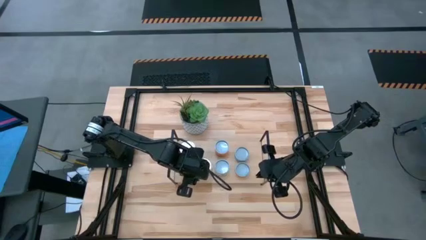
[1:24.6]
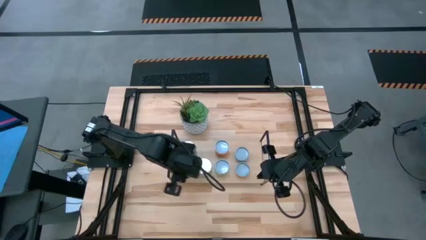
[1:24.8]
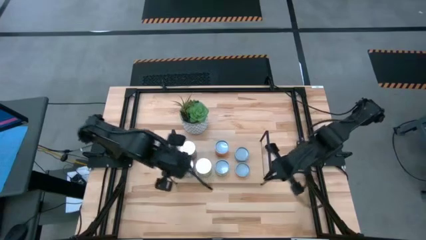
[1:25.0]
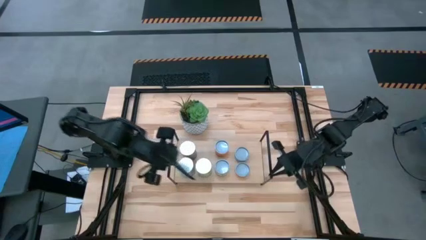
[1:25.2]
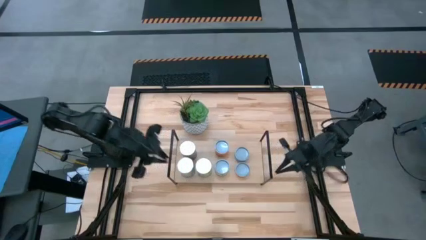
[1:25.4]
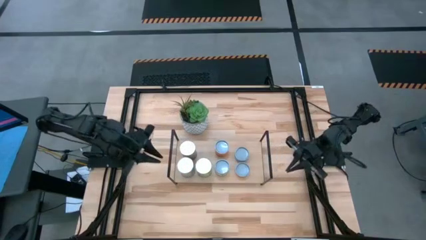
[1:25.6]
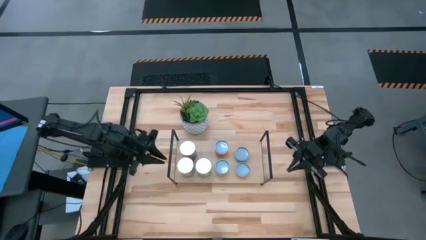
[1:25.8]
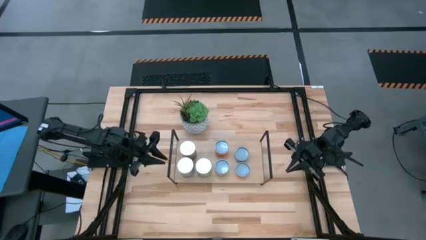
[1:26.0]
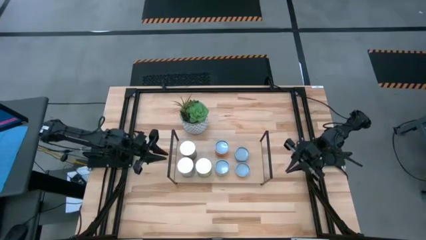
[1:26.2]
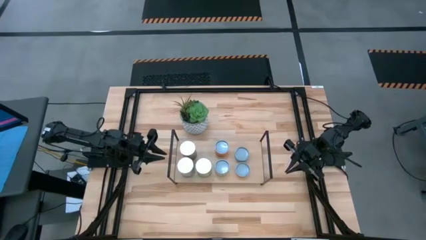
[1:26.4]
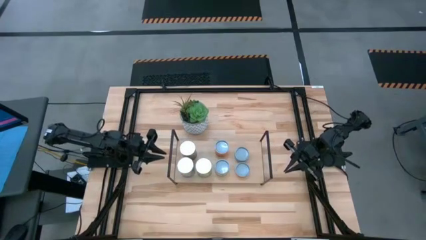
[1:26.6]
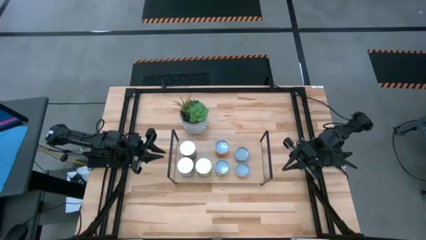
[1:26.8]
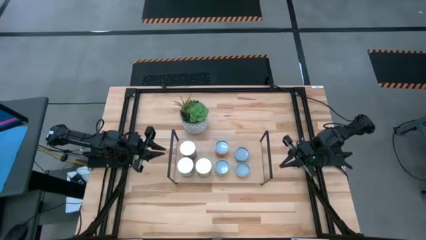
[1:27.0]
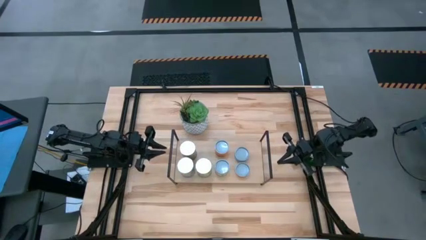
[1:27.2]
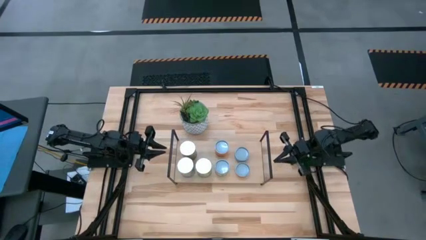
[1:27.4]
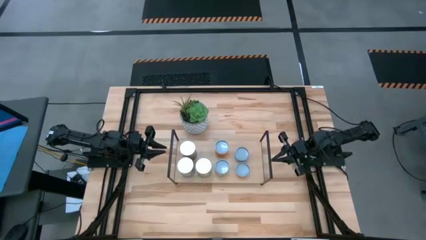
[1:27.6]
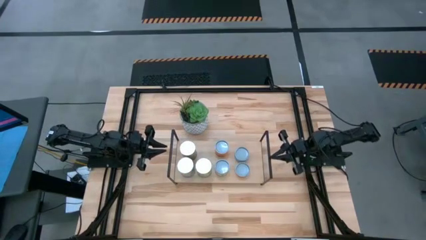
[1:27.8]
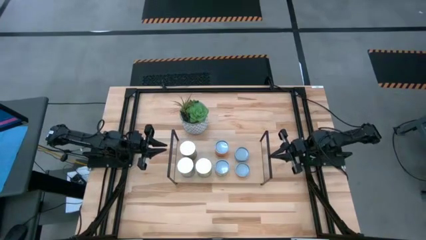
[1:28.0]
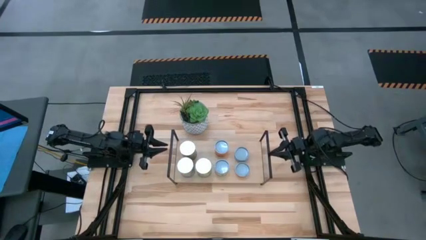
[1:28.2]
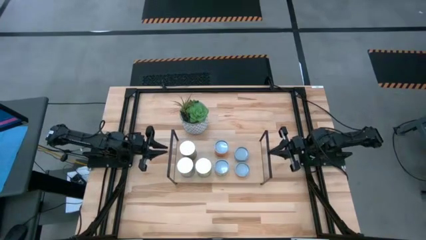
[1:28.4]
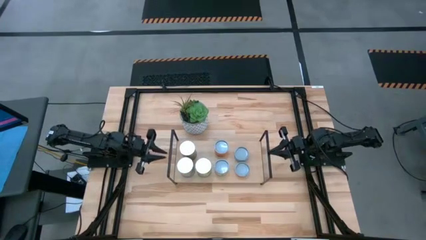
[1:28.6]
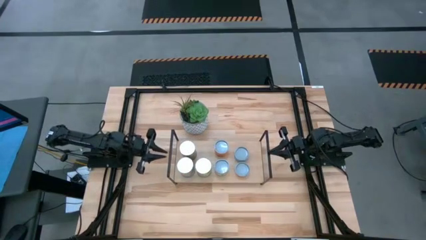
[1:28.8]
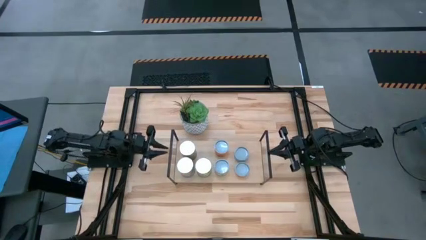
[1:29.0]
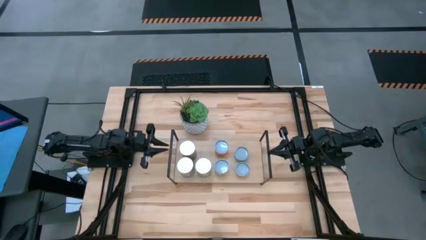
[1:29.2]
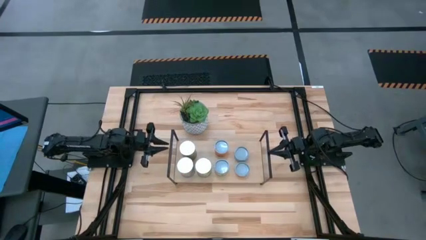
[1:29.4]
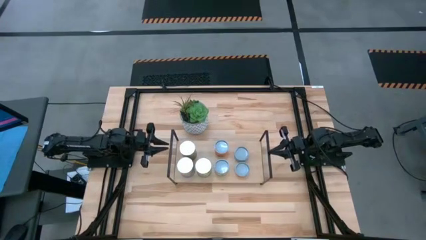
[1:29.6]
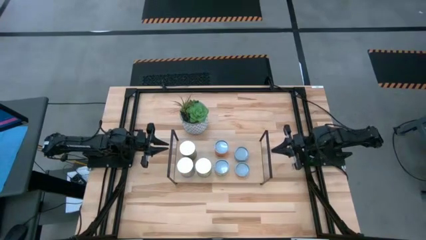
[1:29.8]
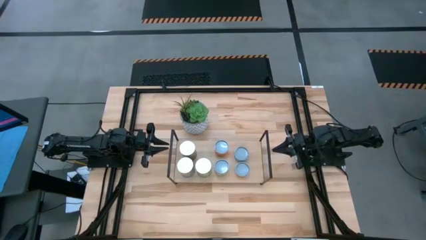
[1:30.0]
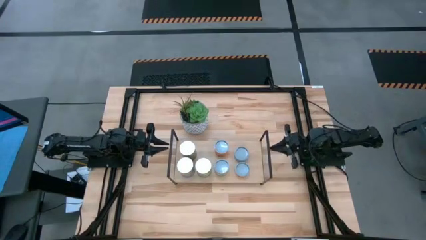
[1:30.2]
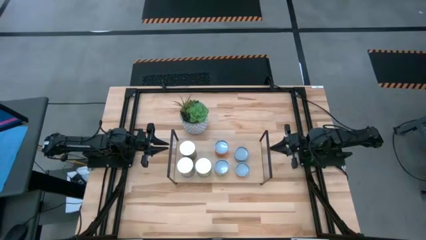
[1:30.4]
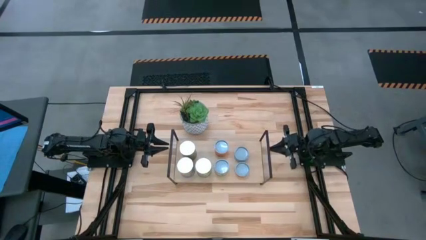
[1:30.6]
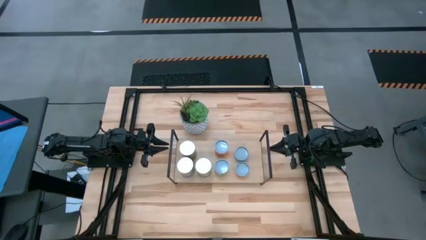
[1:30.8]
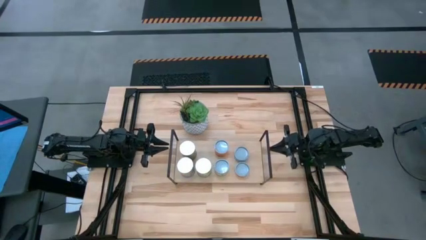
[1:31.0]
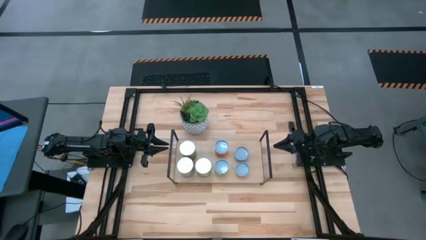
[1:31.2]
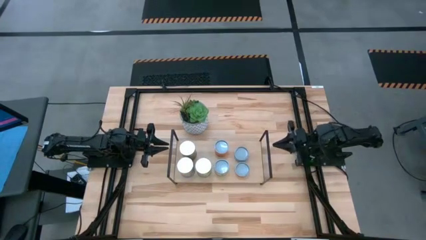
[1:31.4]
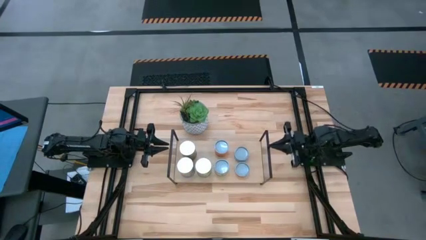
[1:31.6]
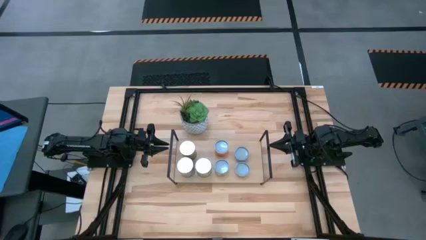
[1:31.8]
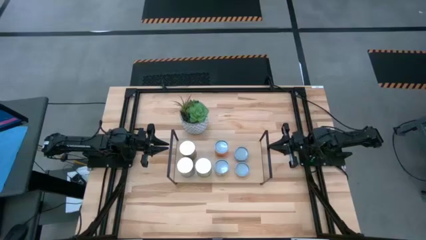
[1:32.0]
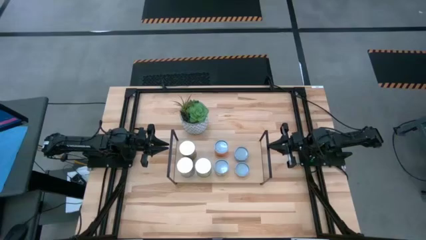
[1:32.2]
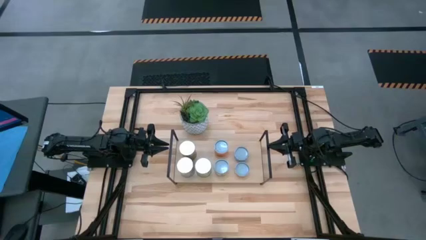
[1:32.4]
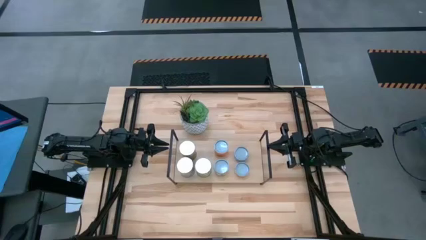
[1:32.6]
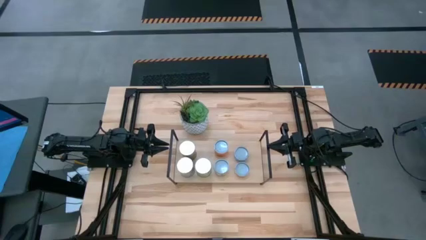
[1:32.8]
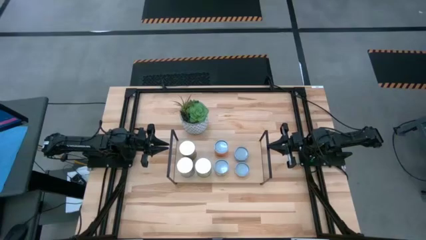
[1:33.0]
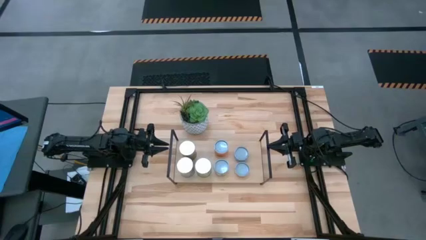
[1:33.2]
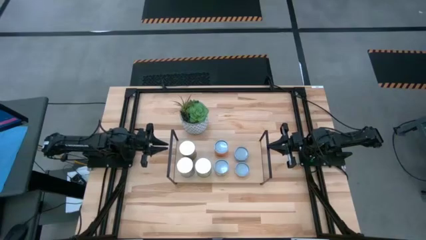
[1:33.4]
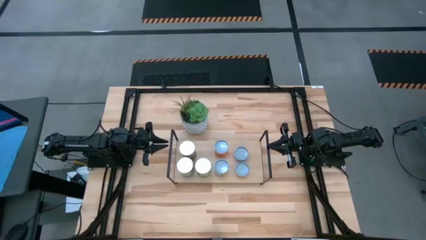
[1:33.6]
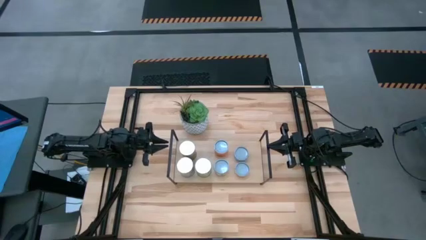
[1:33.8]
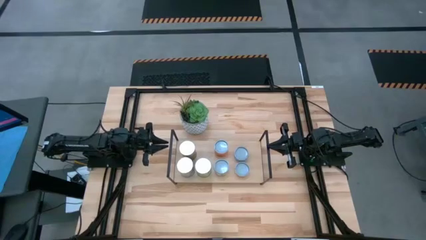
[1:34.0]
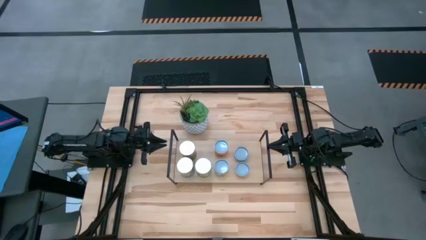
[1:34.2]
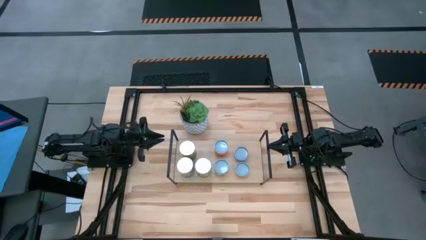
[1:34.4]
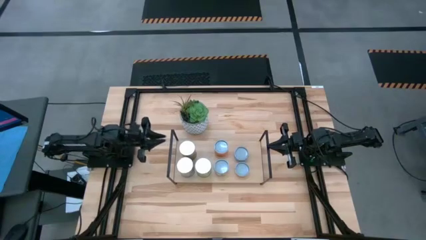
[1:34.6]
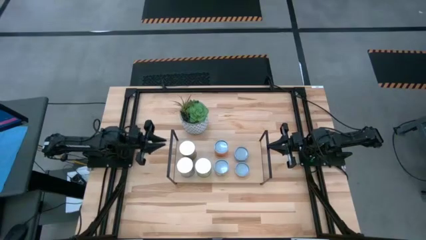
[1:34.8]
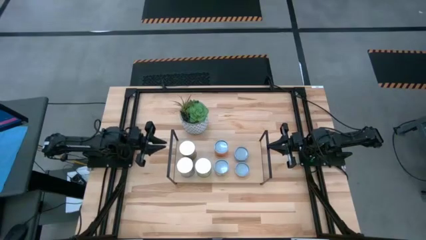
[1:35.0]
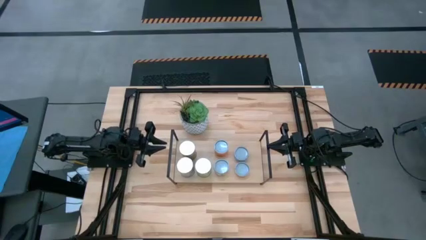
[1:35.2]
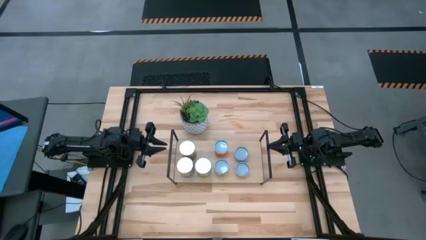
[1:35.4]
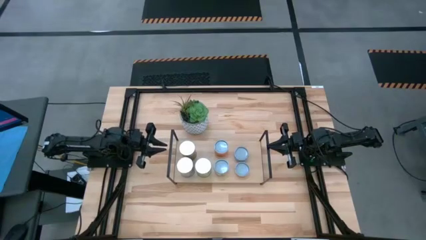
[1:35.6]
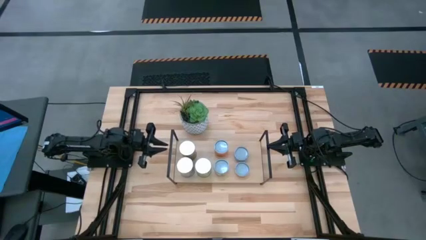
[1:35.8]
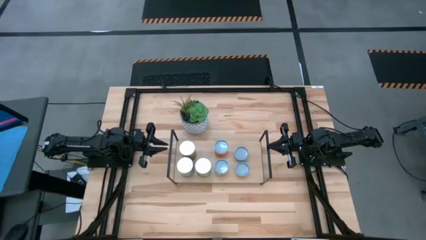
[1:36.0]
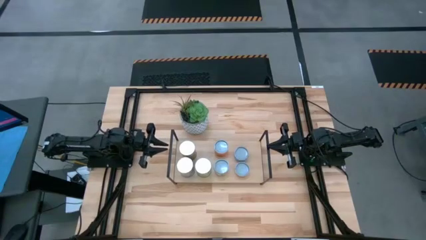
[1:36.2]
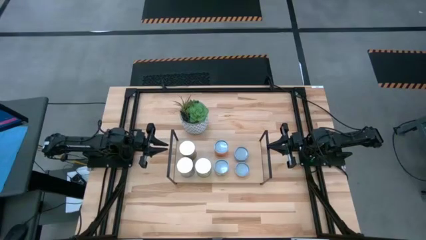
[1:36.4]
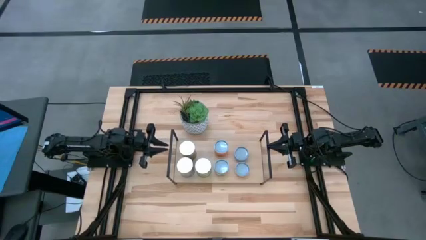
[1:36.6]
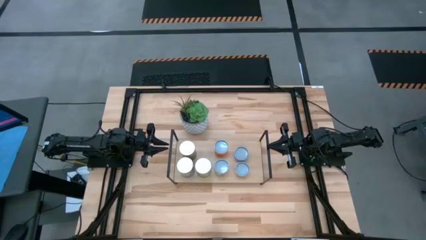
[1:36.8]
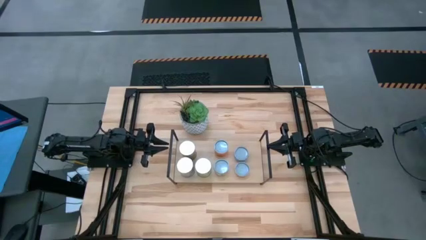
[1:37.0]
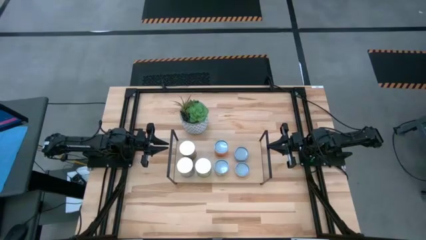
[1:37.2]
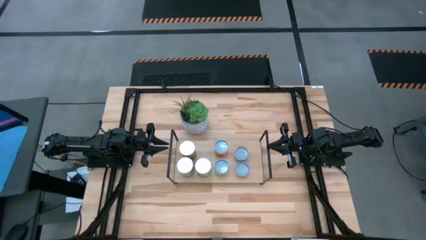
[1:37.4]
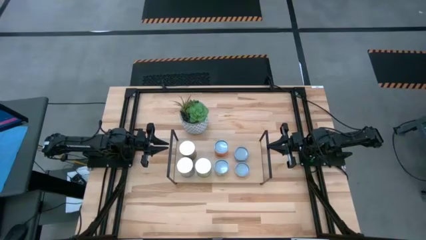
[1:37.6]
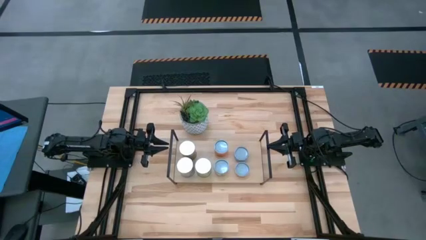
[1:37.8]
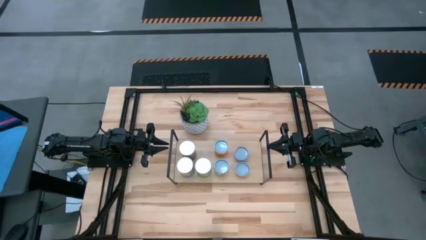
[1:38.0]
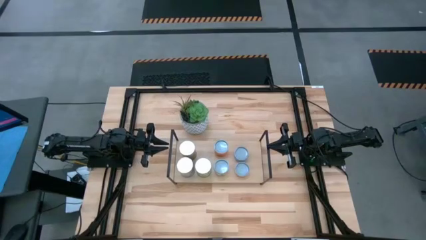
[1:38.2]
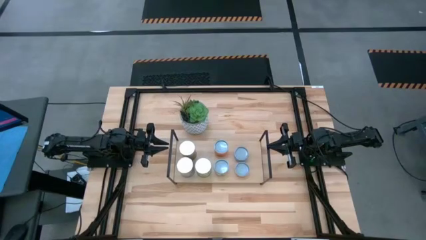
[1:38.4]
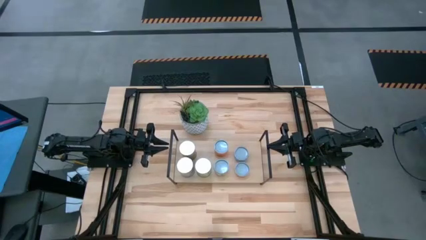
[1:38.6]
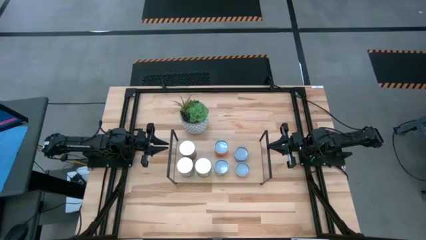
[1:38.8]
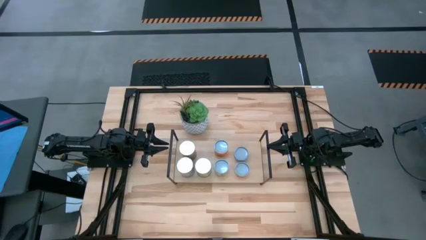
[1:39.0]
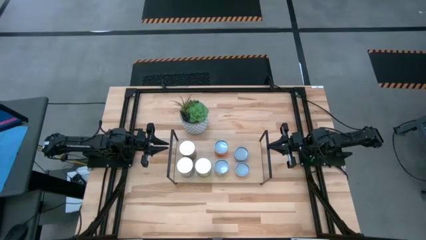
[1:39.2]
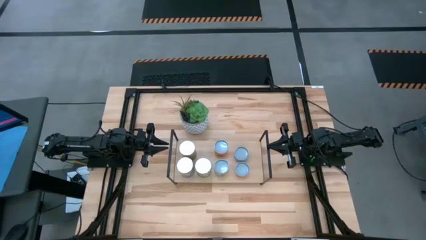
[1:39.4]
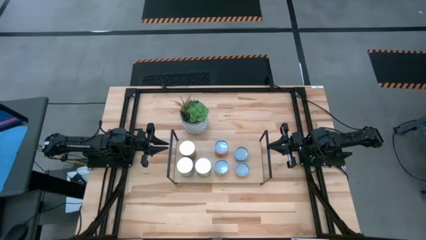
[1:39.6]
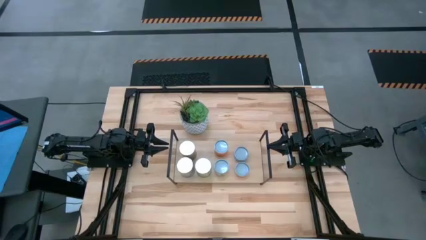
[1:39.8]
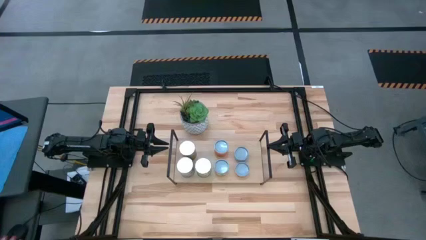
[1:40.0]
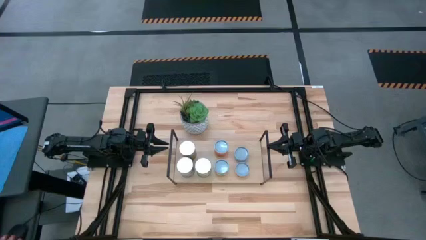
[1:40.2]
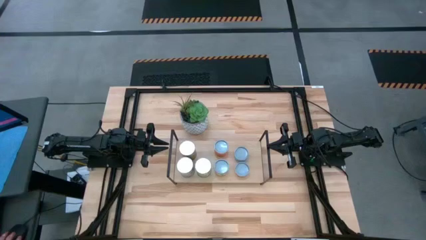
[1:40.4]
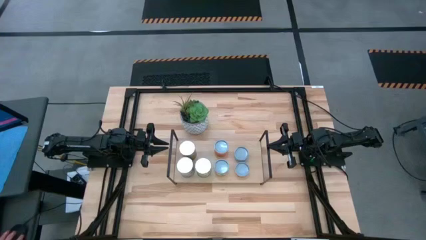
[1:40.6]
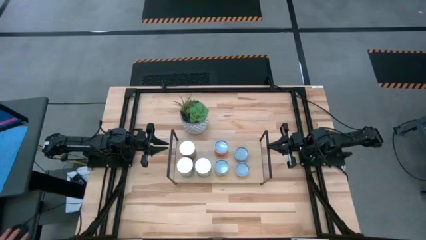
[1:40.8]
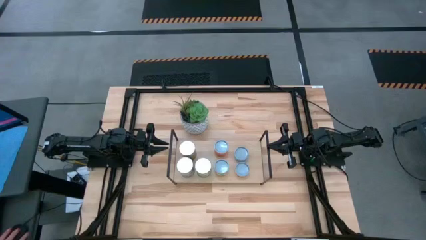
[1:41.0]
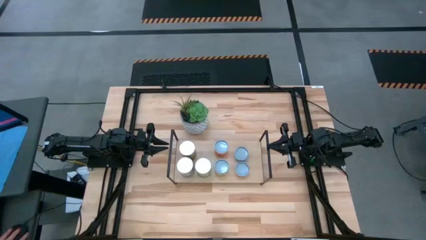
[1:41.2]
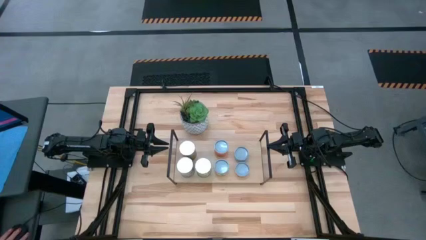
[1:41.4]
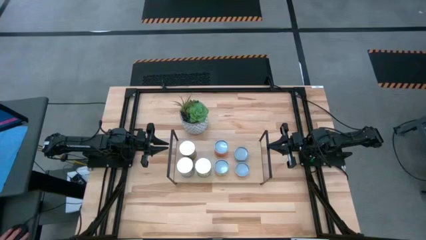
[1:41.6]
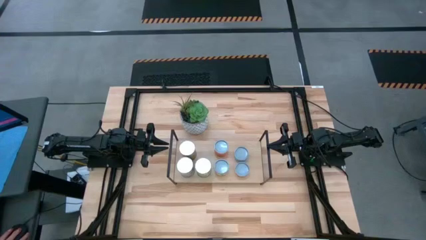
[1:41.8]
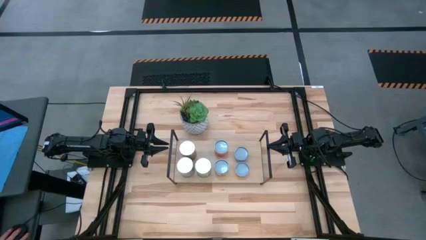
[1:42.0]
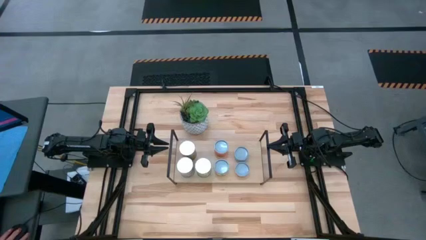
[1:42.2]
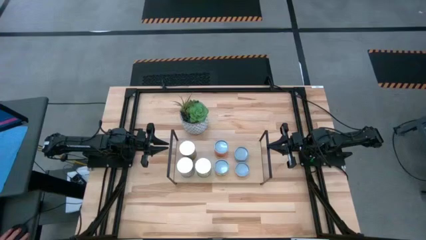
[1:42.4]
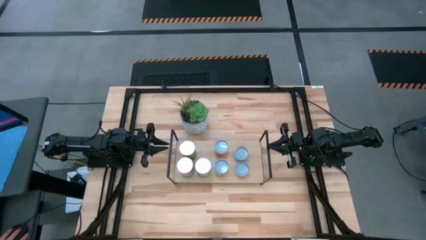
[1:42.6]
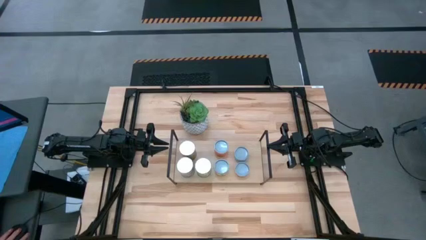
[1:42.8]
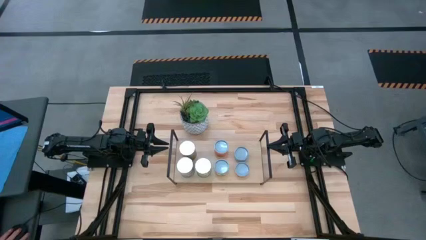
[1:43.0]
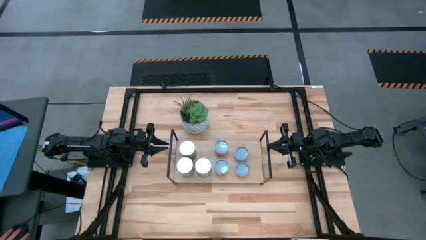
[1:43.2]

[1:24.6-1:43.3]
Task: Pick and place cans onto a shelf
Return to Home Position
